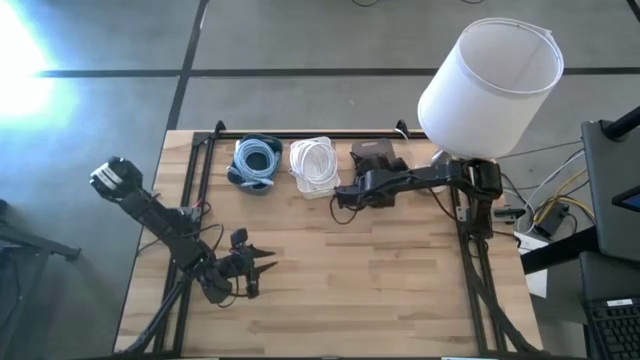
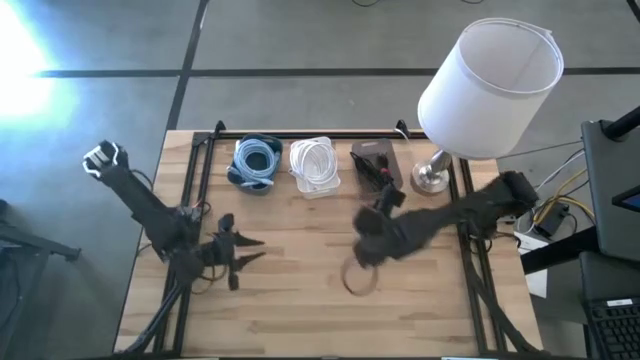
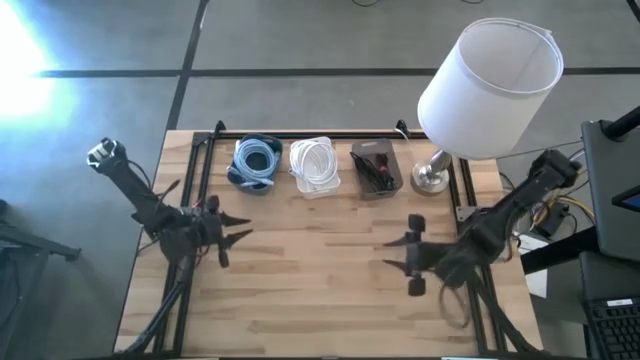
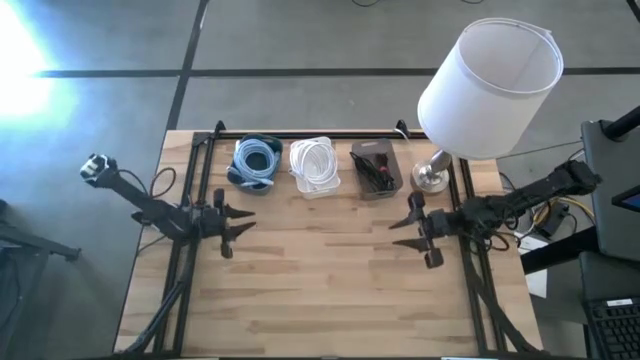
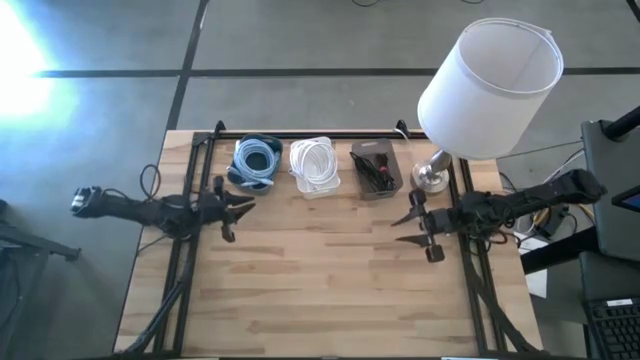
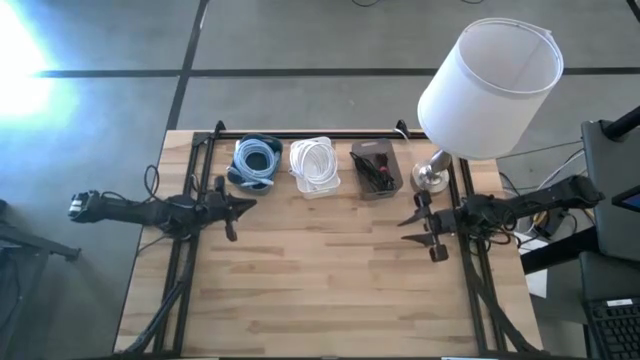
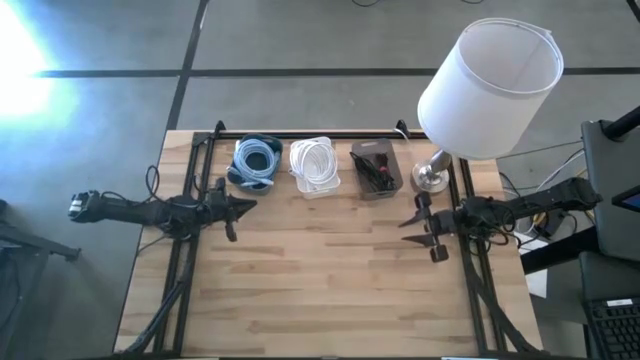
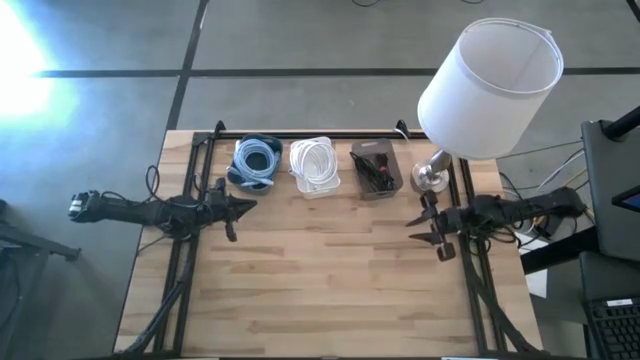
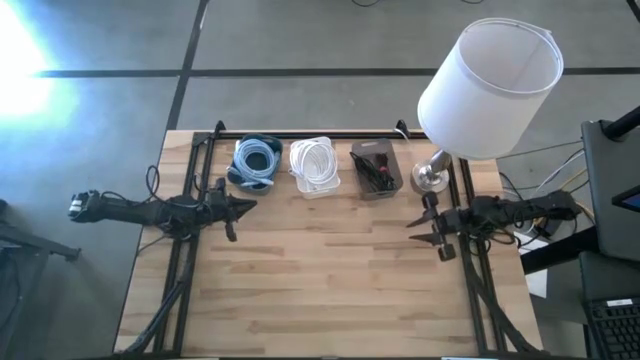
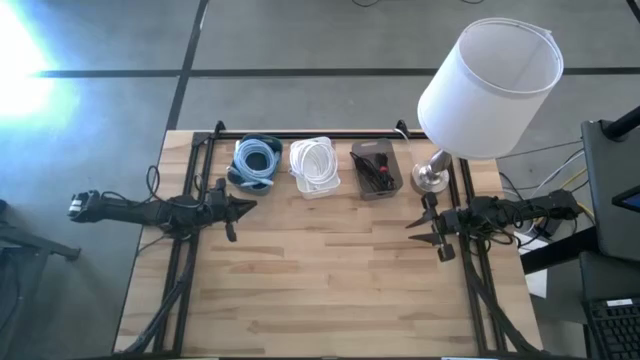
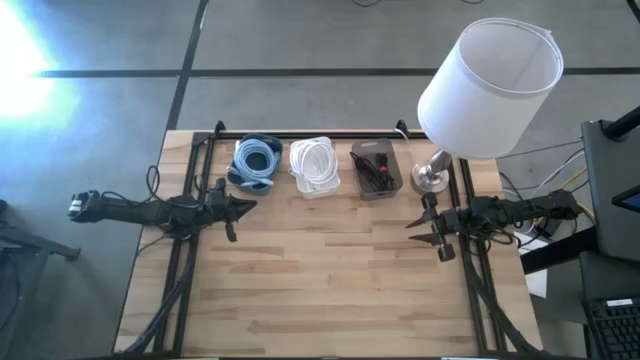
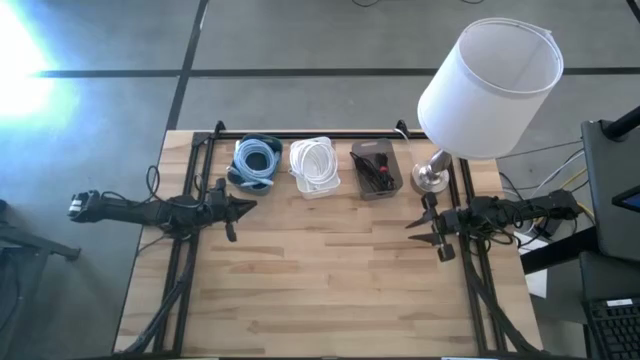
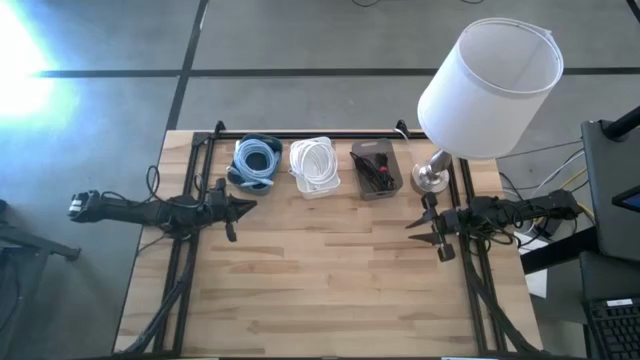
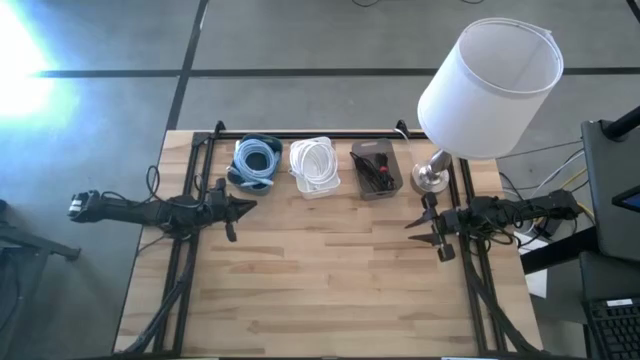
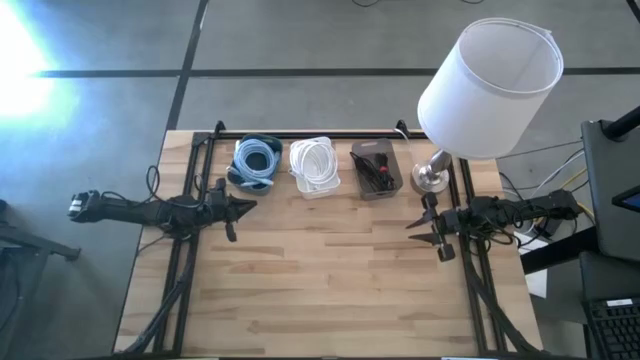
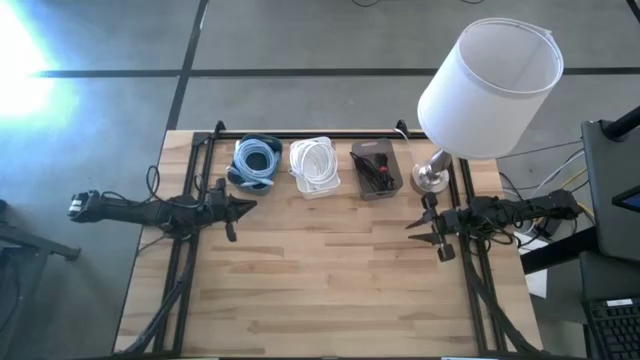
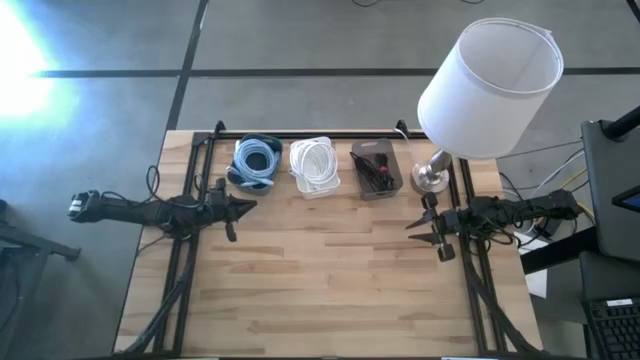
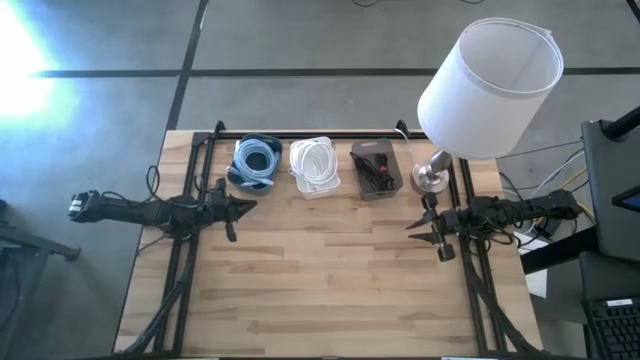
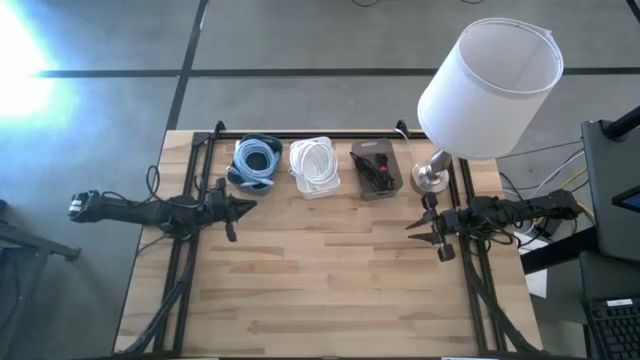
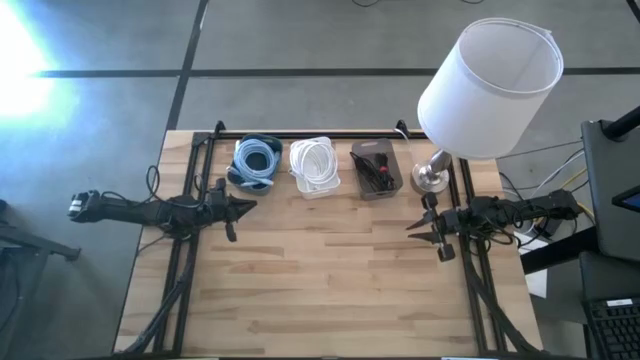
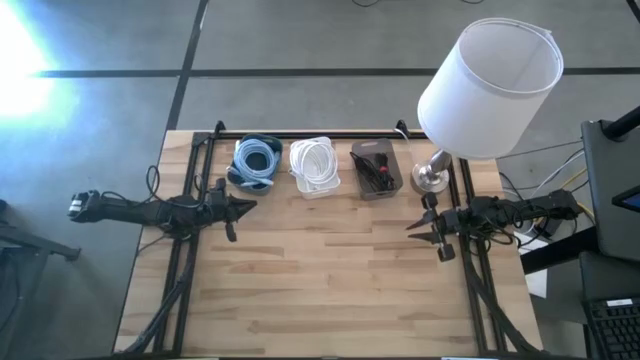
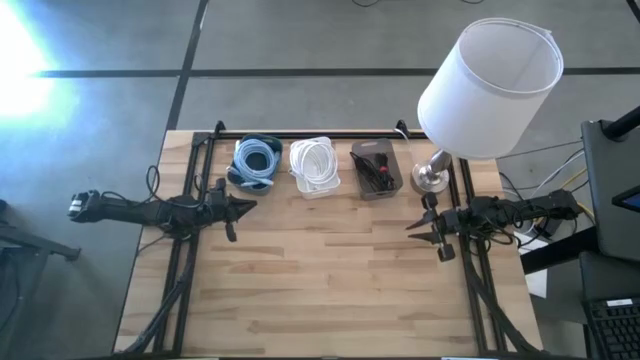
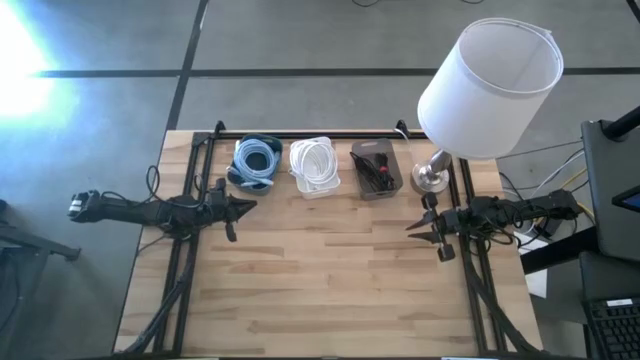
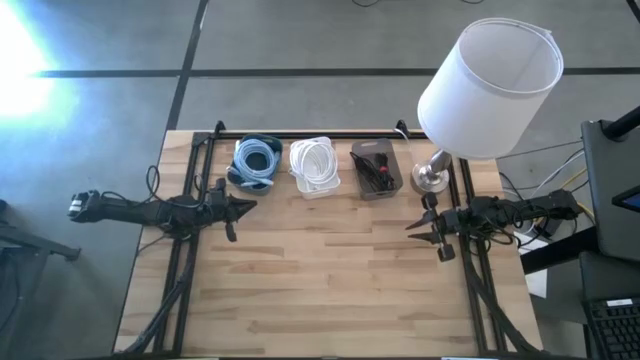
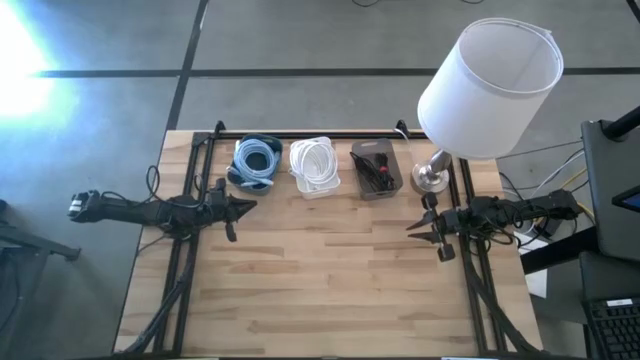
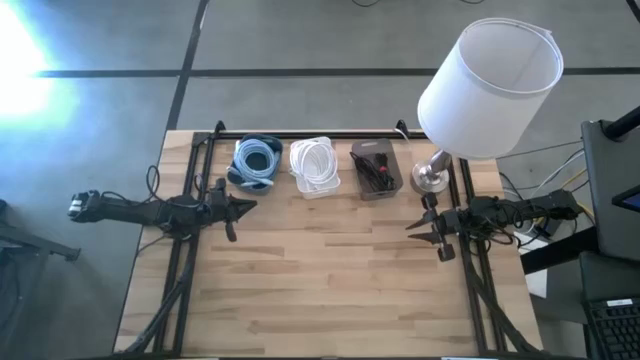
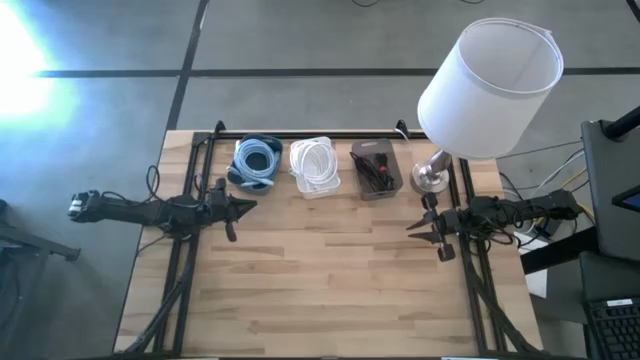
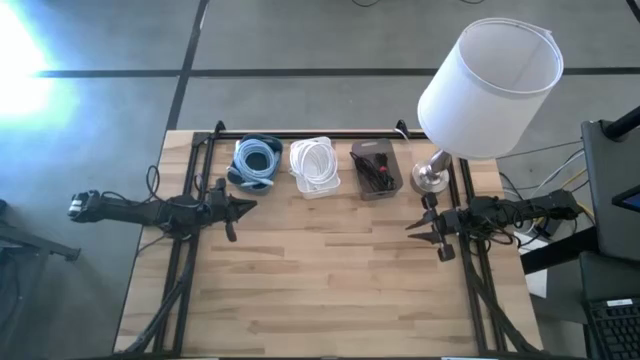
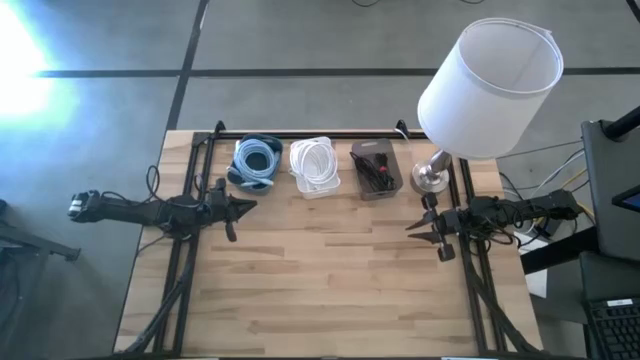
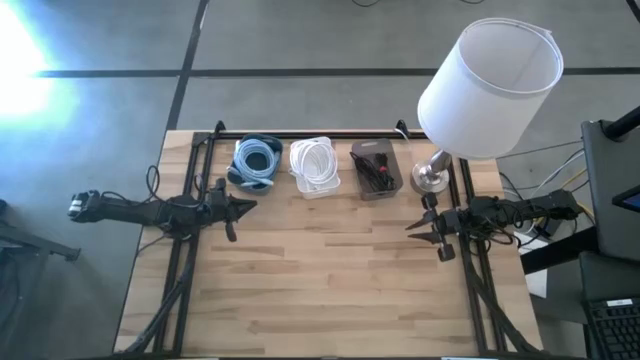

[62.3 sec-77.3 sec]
Task: Pick & Place USB Port
Return to Home Position

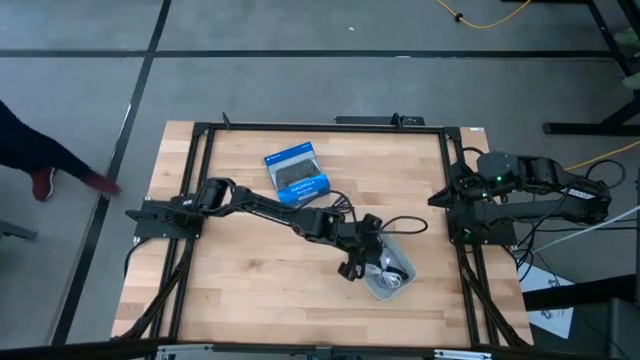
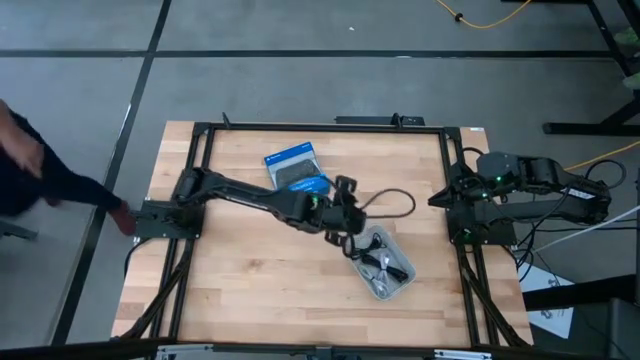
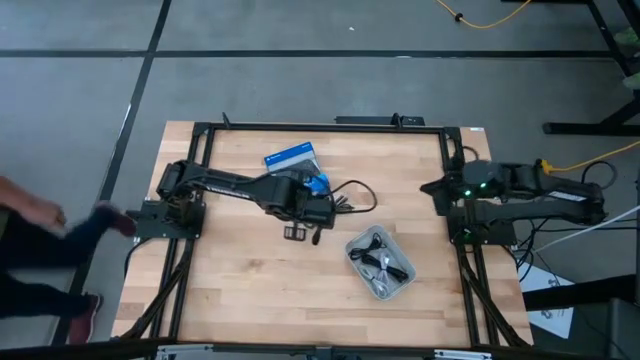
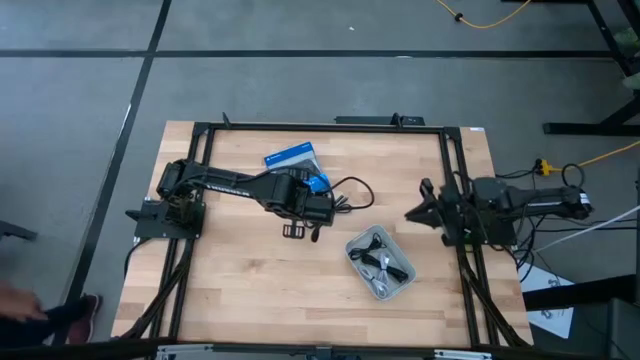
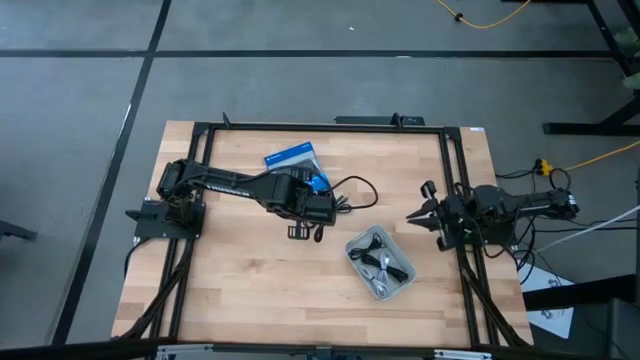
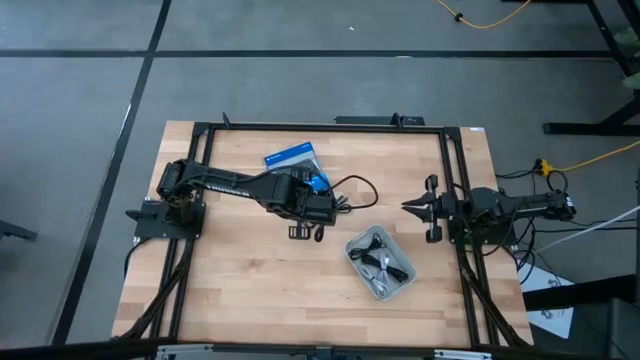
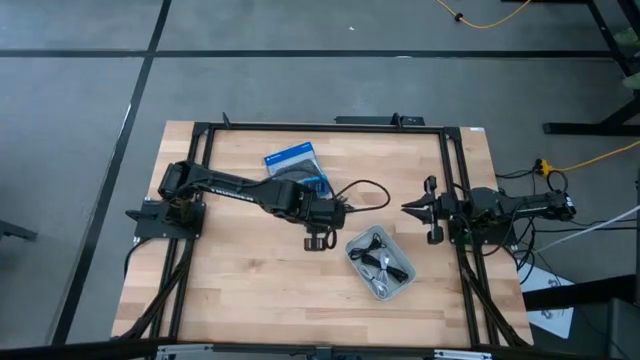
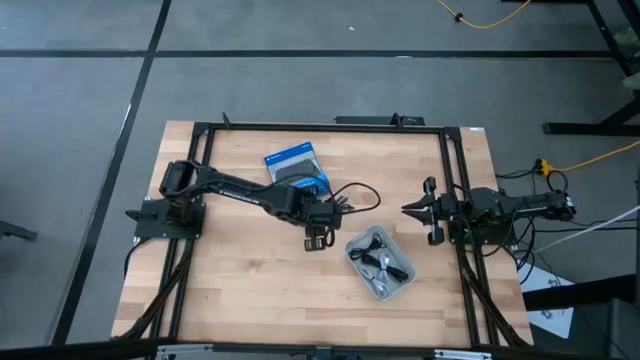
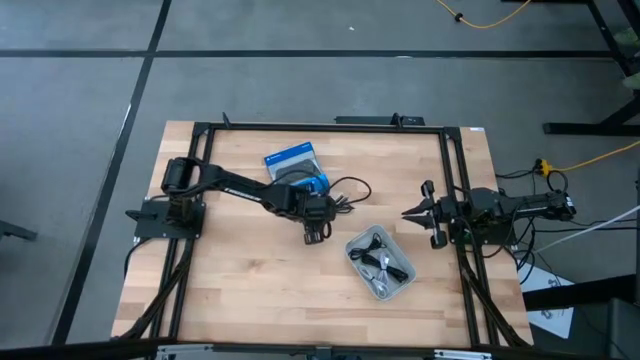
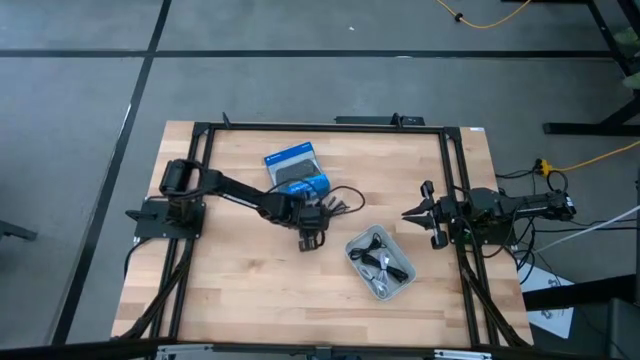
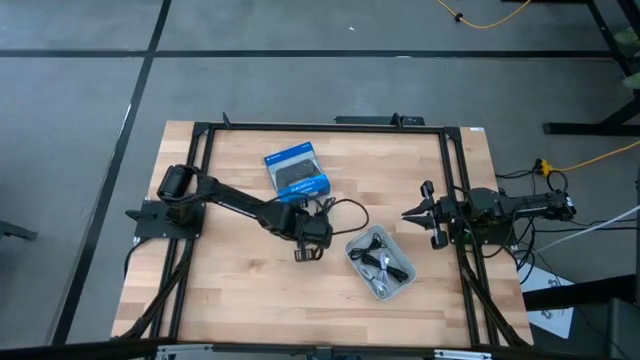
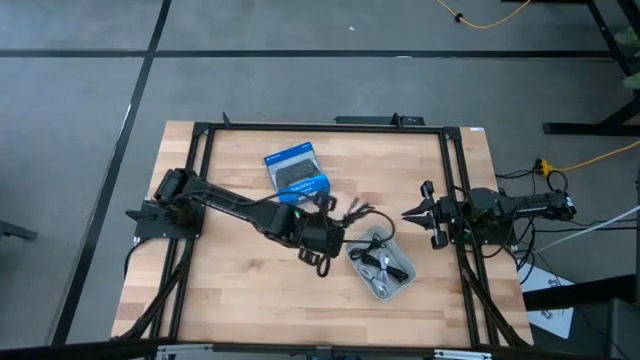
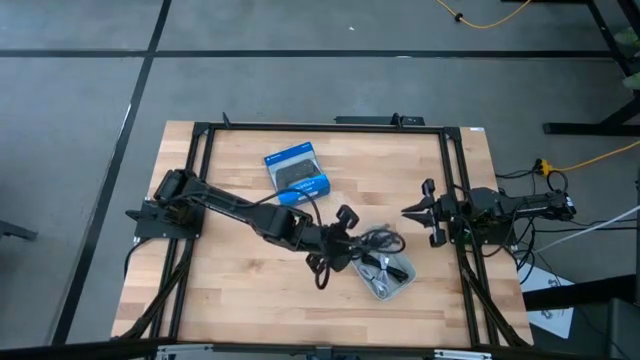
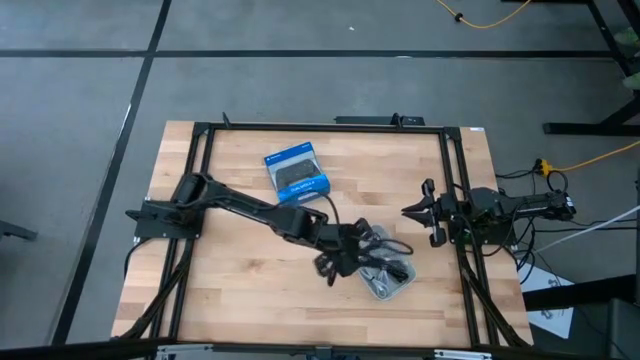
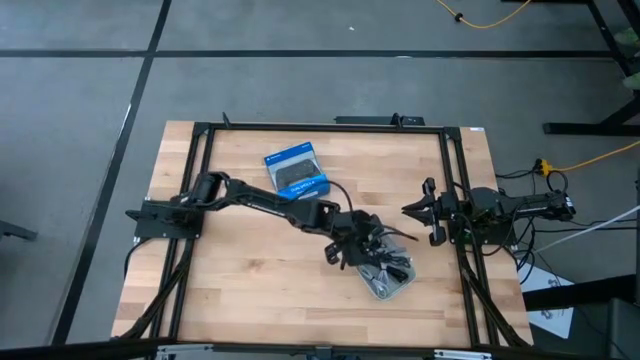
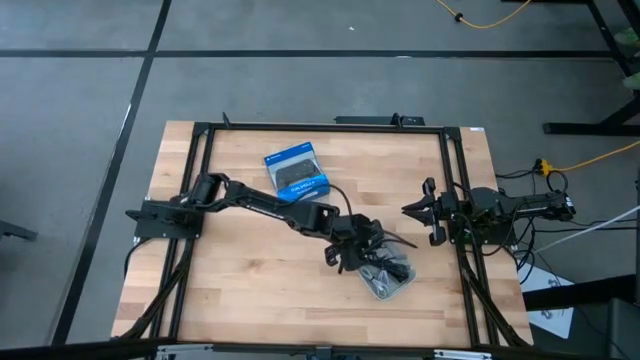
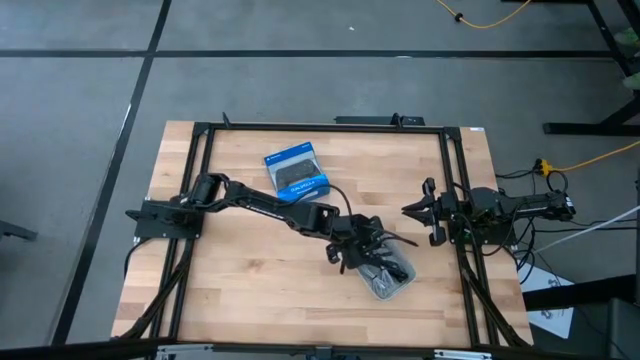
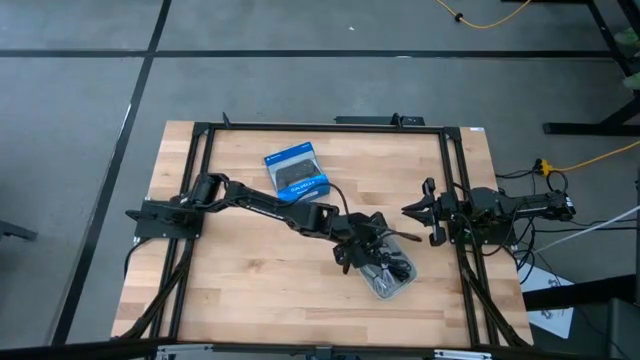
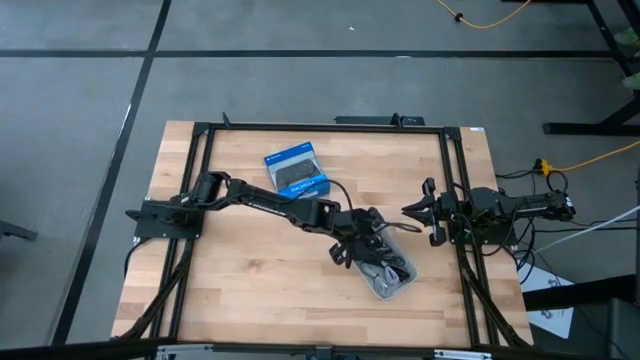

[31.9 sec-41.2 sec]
Task: Pick and place USB-C Cables
Put the black charger cable into the white bin
